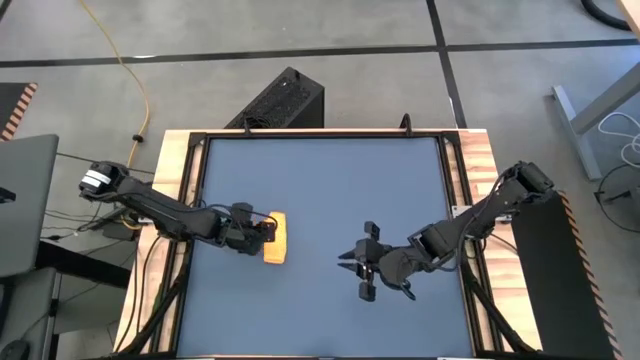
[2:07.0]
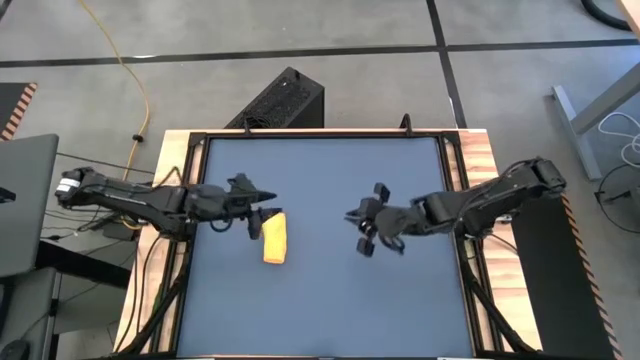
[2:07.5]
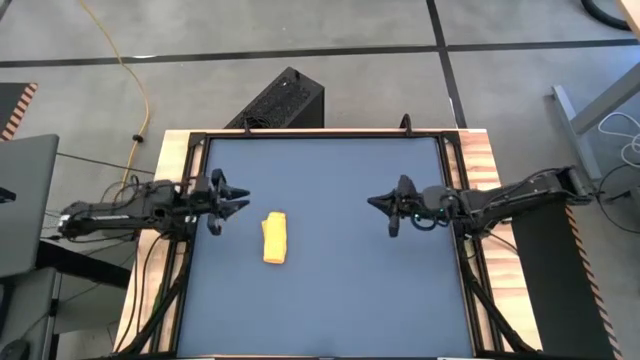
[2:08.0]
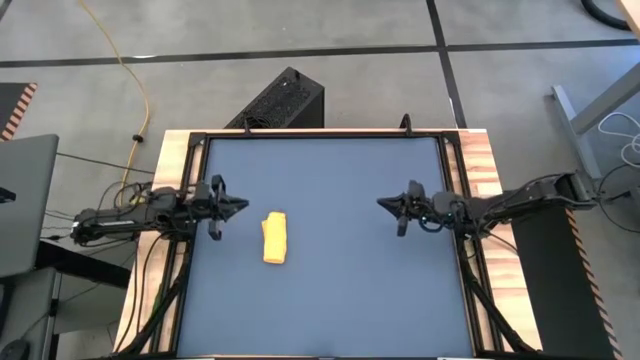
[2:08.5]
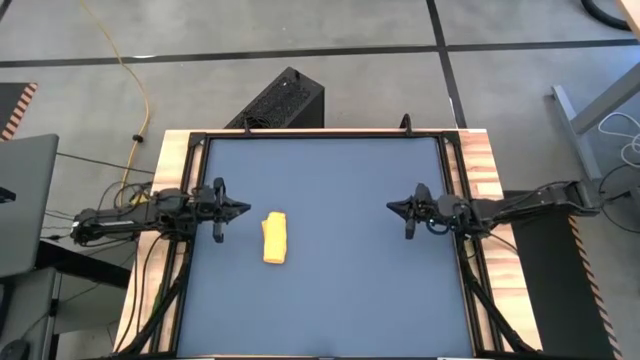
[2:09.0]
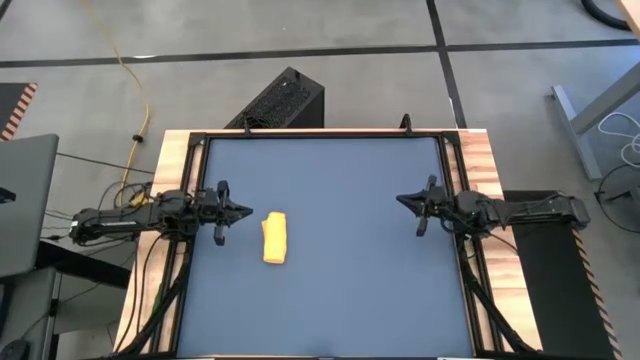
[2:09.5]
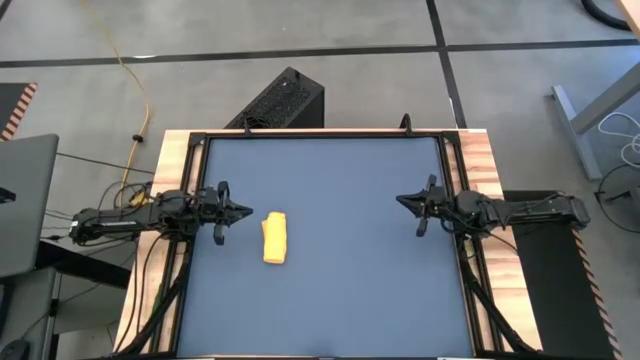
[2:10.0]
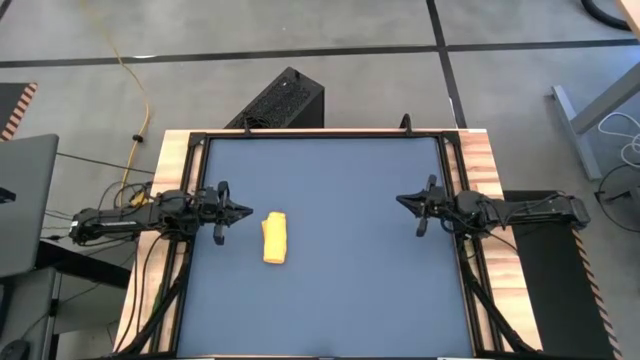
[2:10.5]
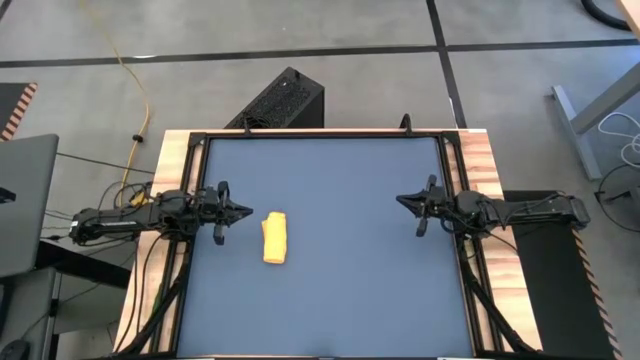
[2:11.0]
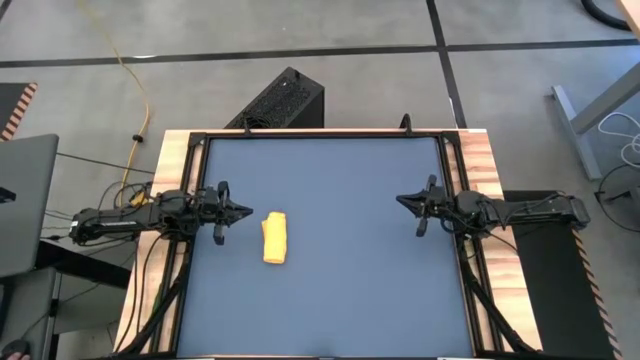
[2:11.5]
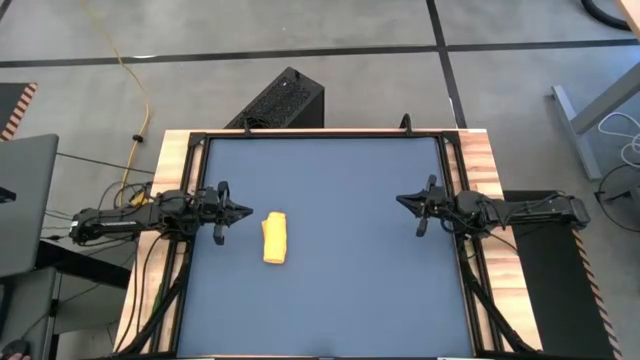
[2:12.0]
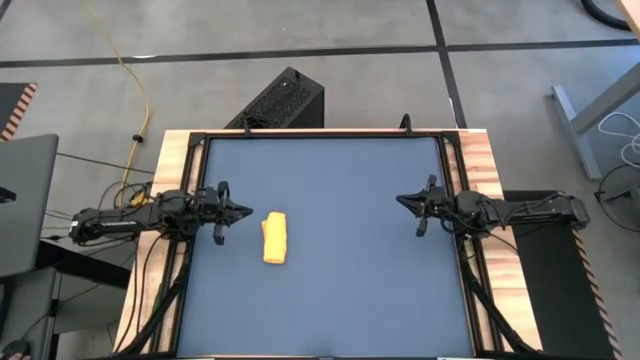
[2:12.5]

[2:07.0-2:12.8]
Task: Roll towel into tight, uniform cylinder
Return to Home Position

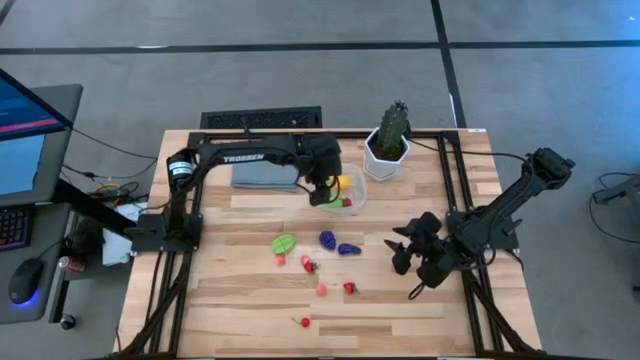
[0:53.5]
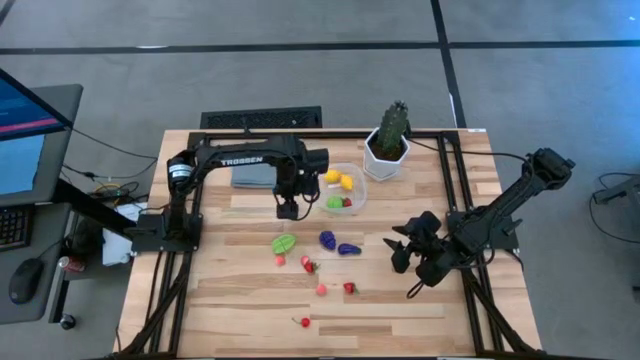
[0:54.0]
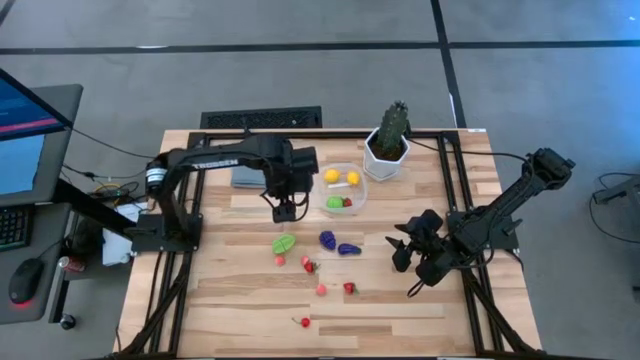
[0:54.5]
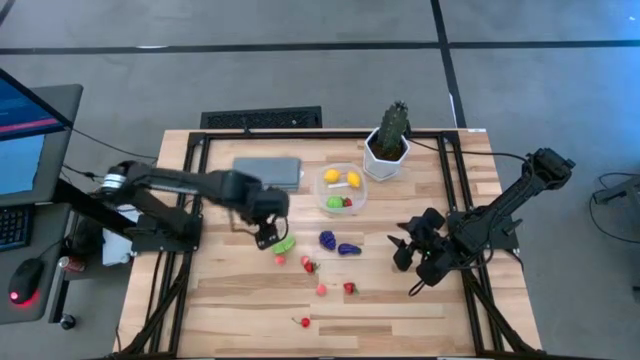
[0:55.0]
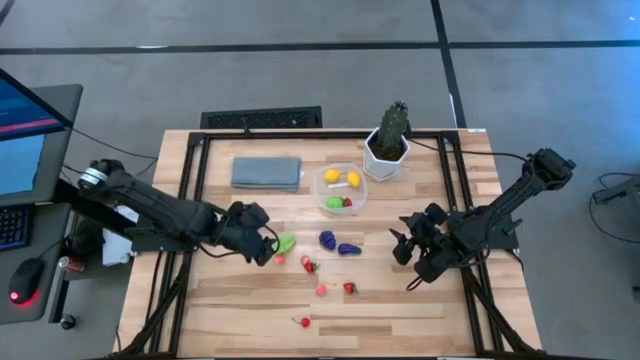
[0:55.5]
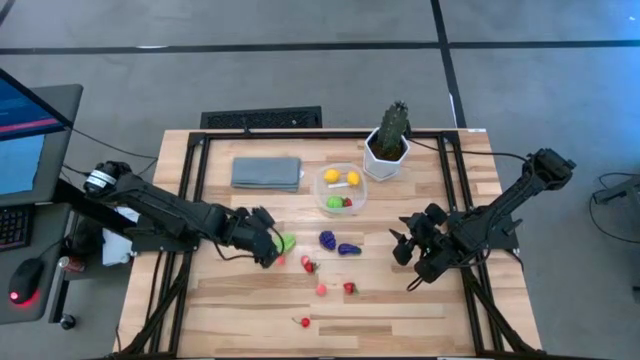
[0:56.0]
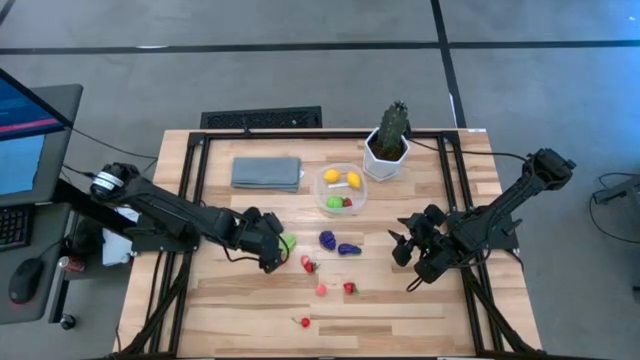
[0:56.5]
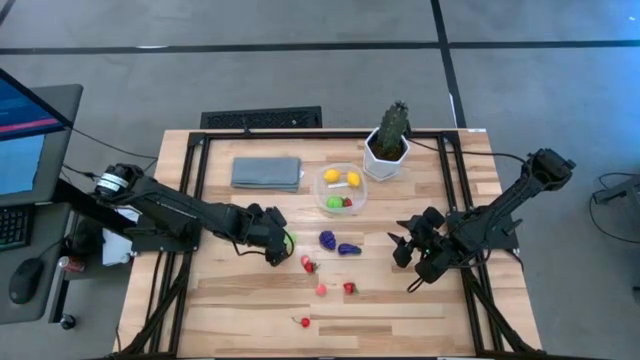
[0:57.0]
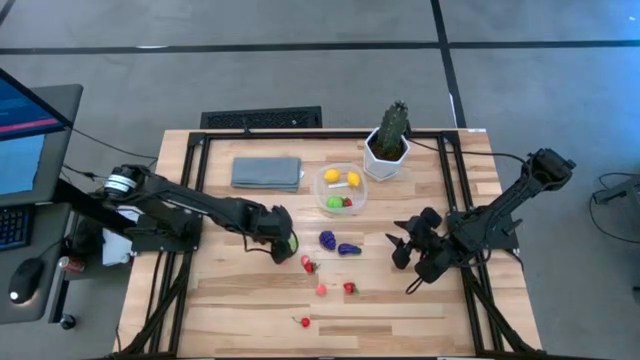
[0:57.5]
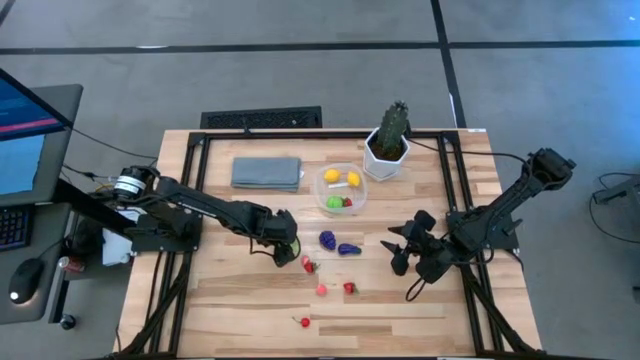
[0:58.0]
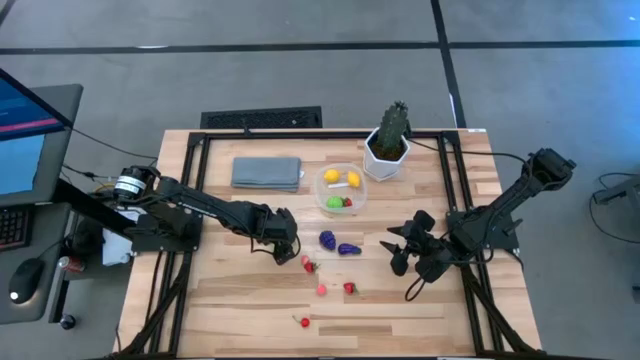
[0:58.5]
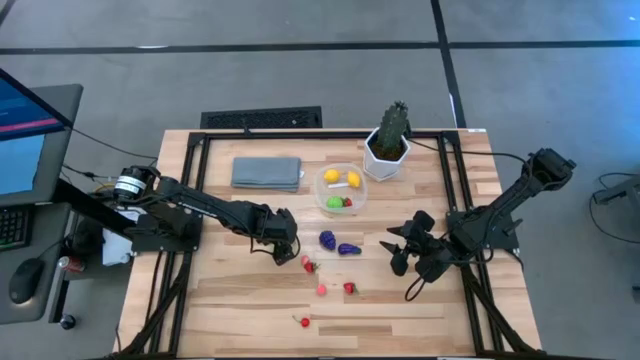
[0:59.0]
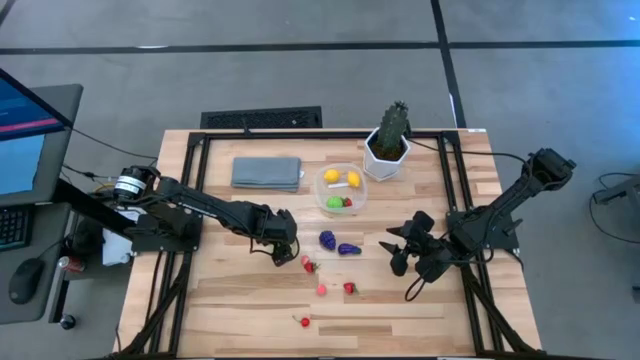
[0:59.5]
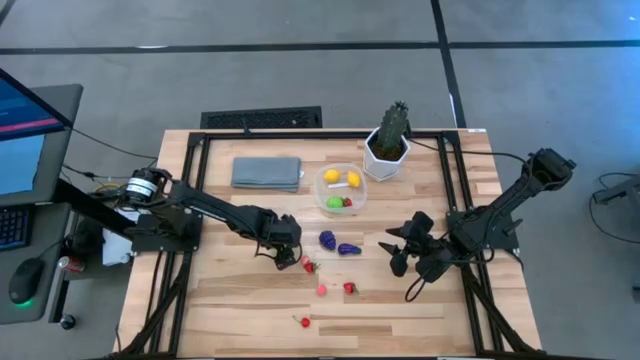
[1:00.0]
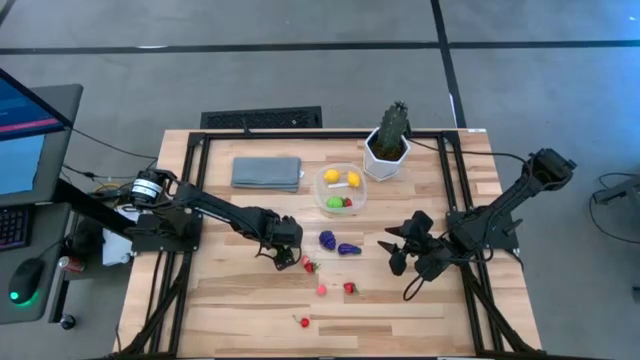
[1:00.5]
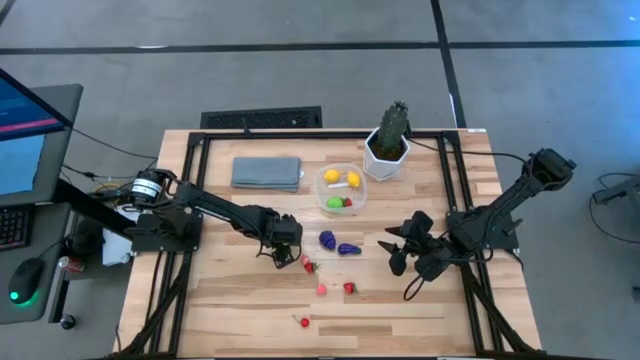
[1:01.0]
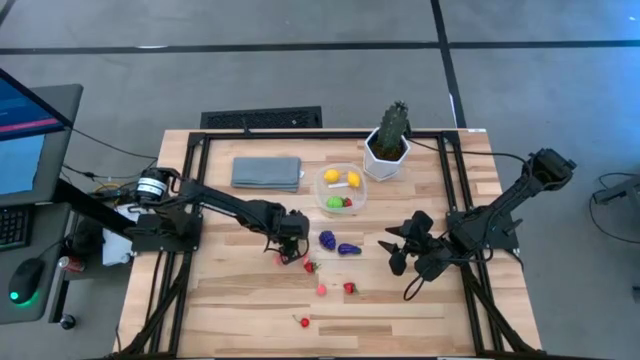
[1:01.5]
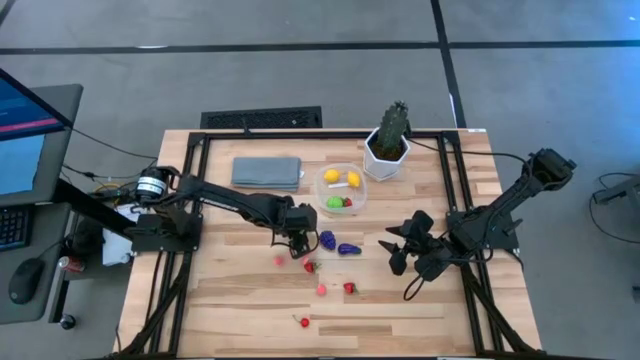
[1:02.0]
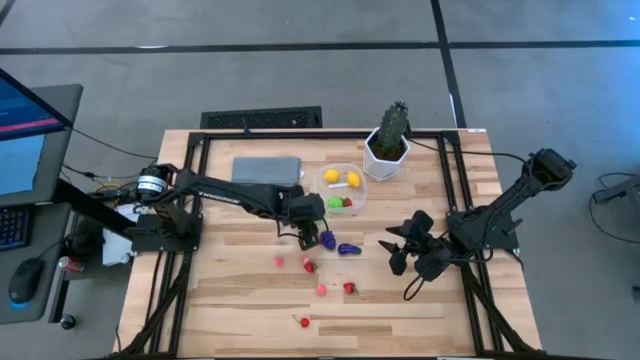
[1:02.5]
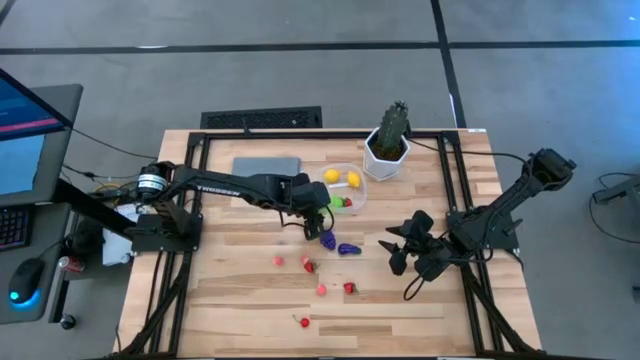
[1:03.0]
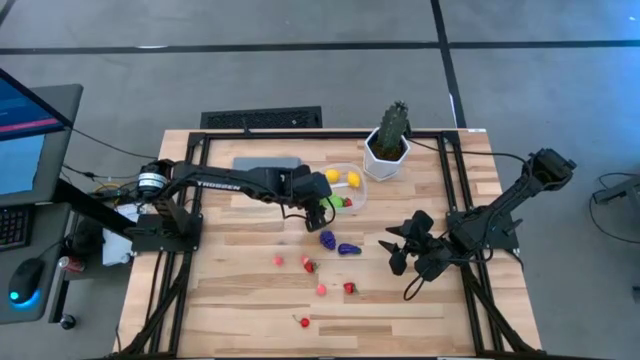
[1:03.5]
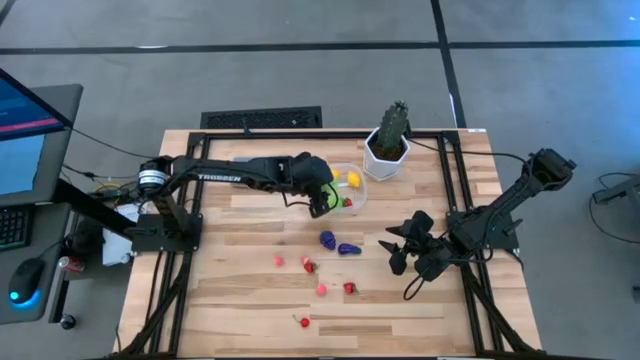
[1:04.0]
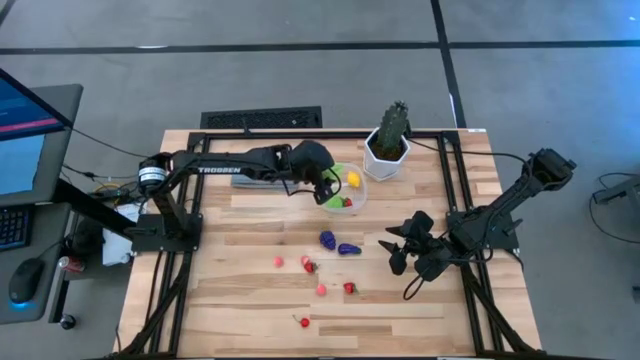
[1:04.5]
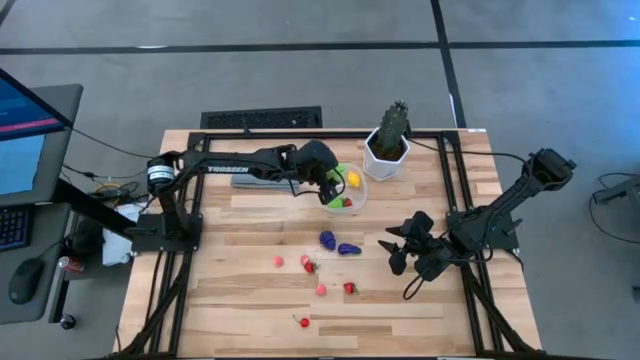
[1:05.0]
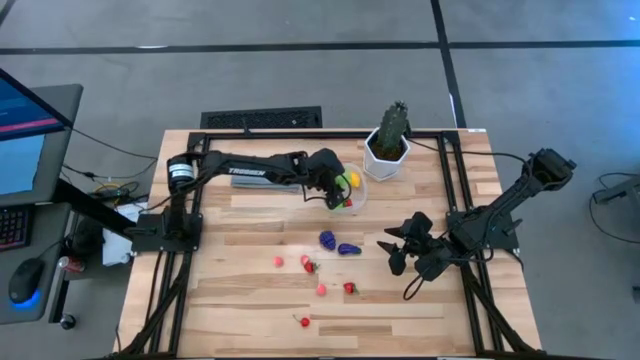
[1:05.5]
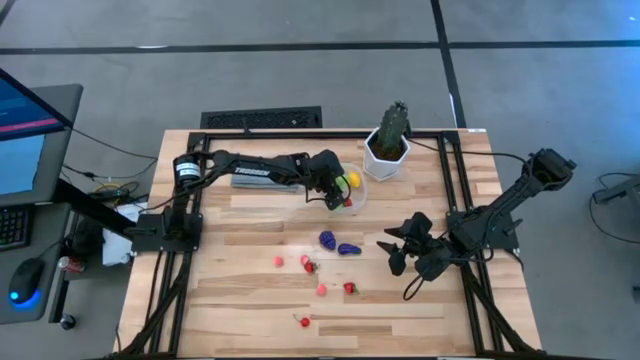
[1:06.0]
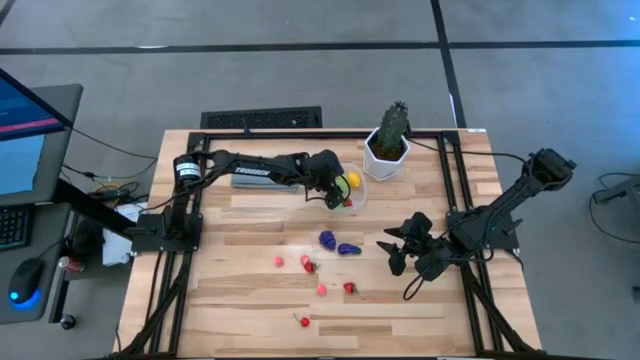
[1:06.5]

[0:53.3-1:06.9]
Task: Pick and placing Produce into tupperware
Put the starfruit into the transparent bin

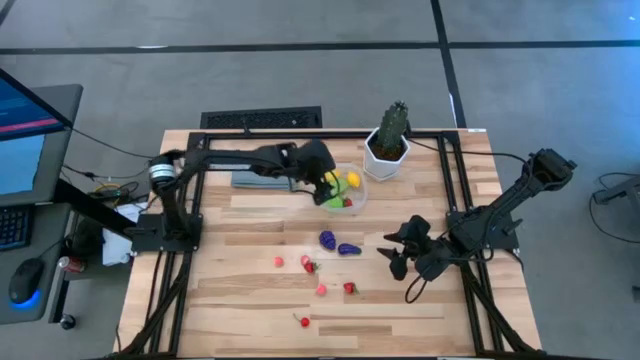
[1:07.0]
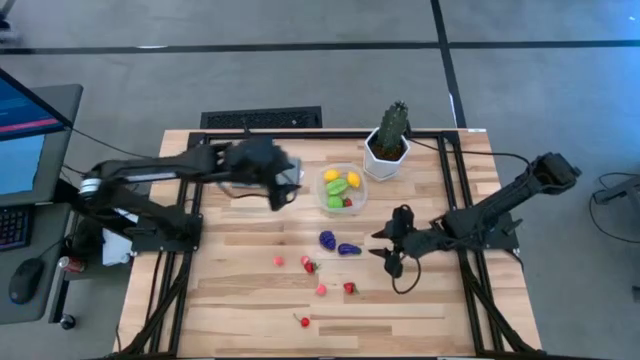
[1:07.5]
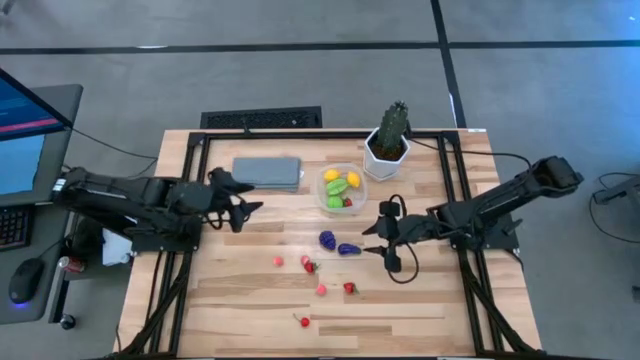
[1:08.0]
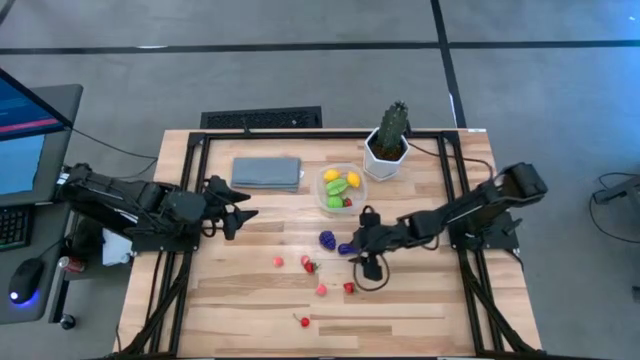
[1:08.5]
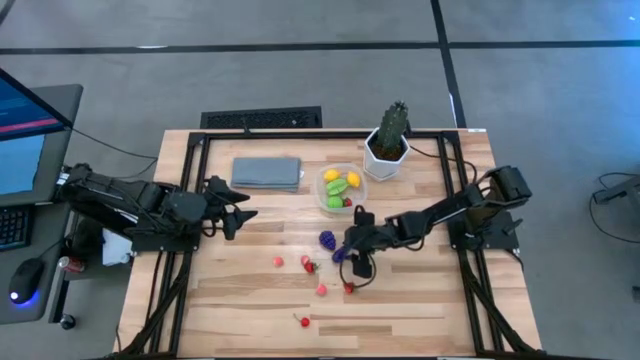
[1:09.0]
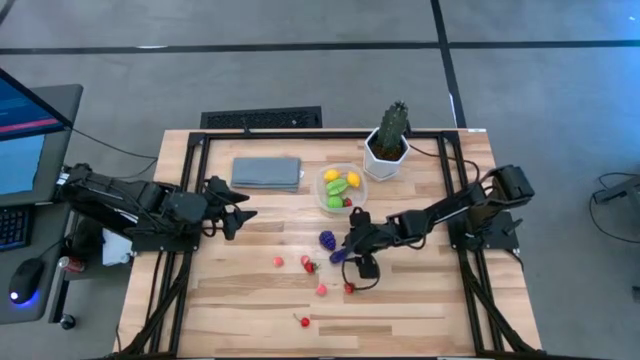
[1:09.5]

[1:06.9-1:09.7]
Put the eggplant into the transparent bin
